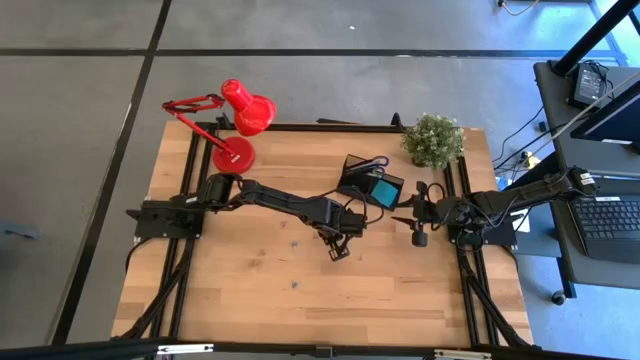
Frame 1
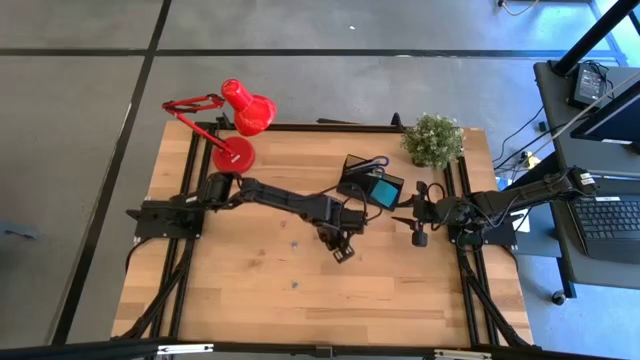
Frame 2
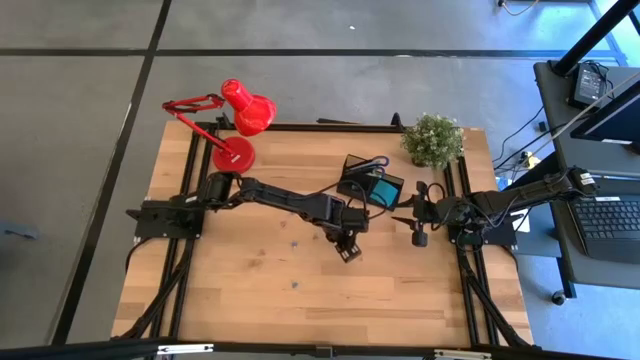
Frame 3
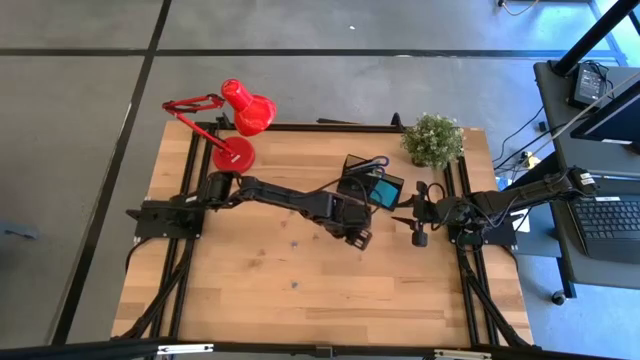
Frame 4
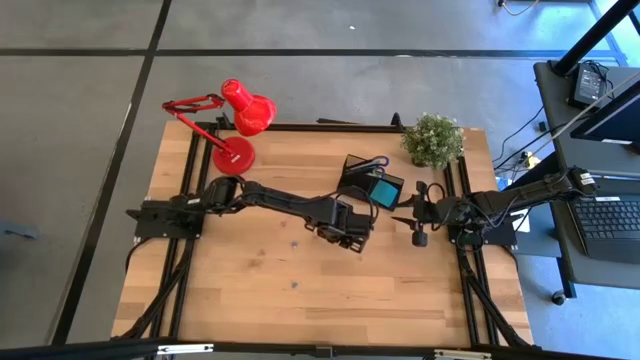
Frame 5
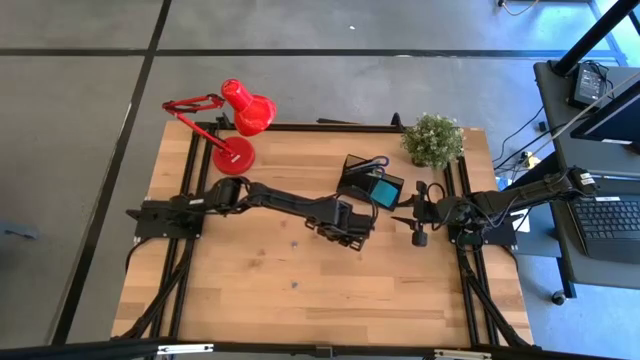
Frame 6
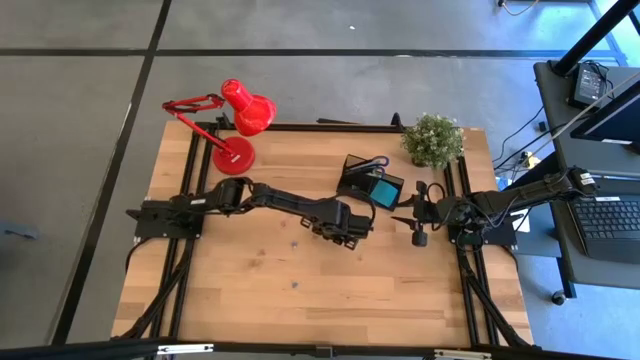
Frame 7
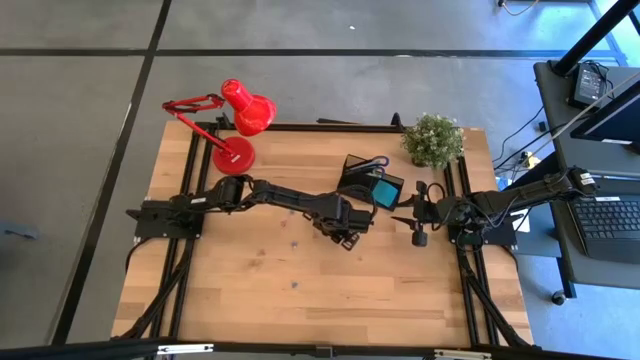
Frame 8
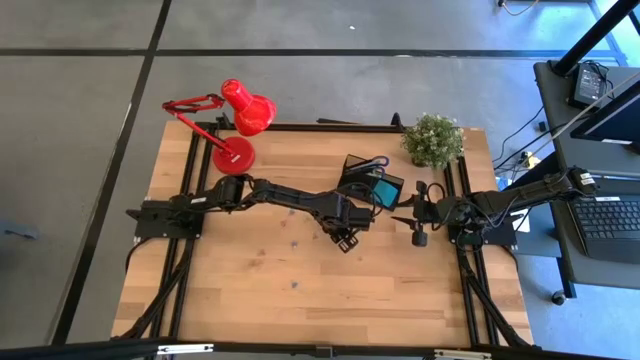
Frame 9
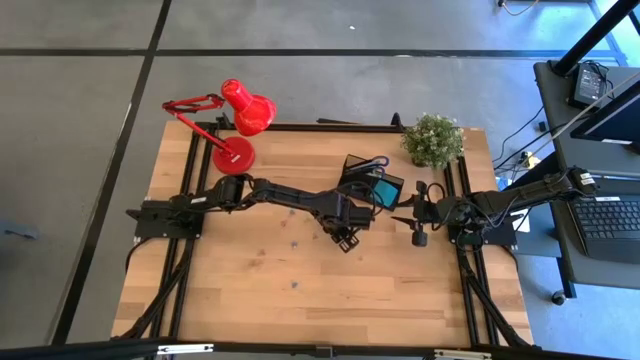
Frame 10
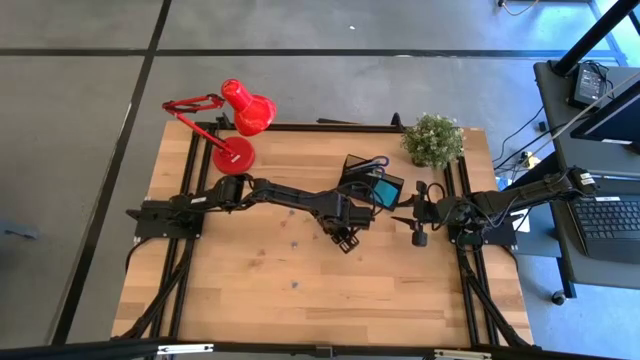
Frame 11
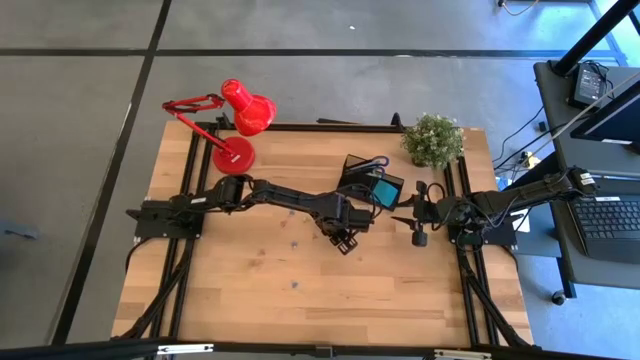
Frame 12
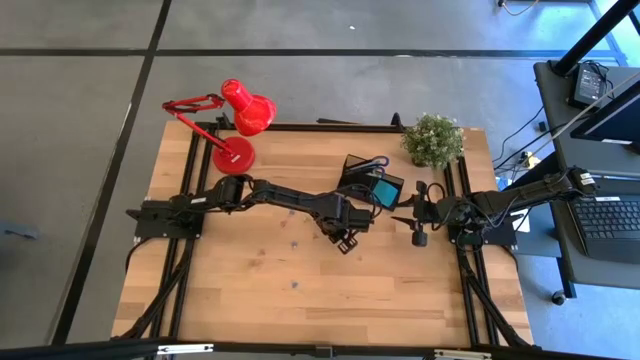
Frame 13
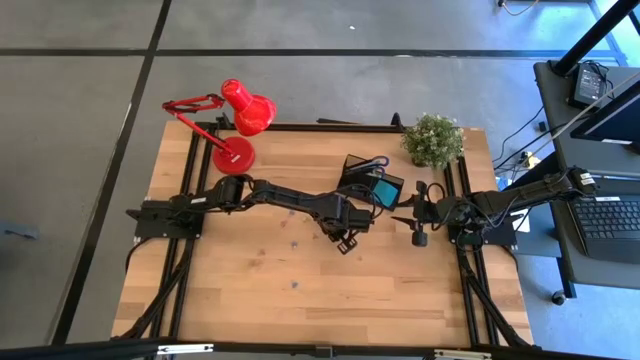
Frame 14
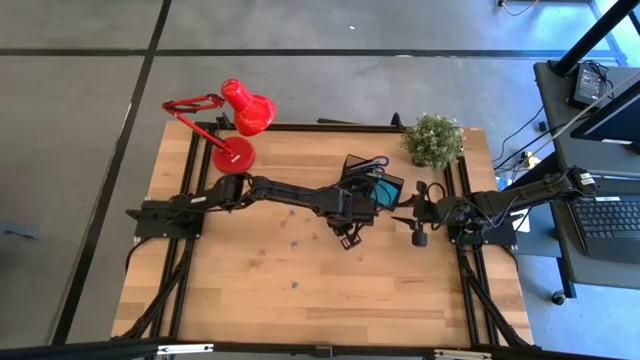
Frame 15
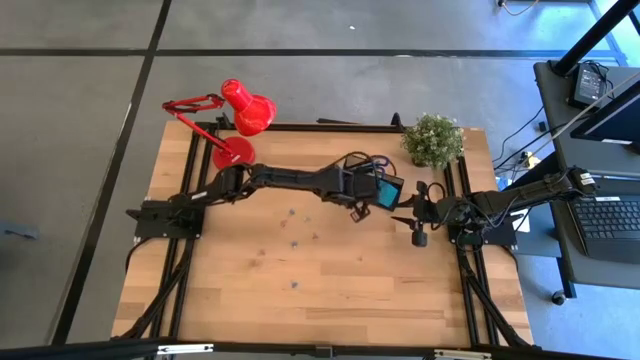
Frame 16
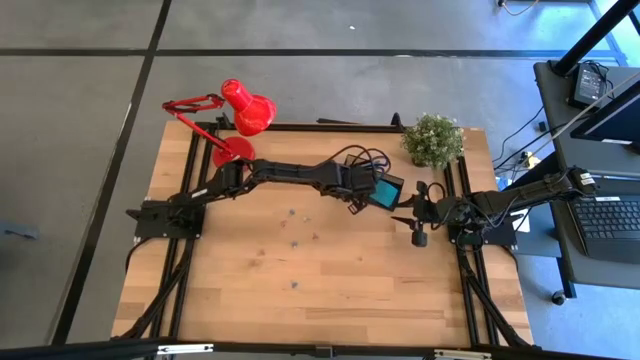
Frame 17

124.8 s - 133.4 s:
Task: Pick and place office supplies into organizer
Put the pink binder clip into the black desk organizer

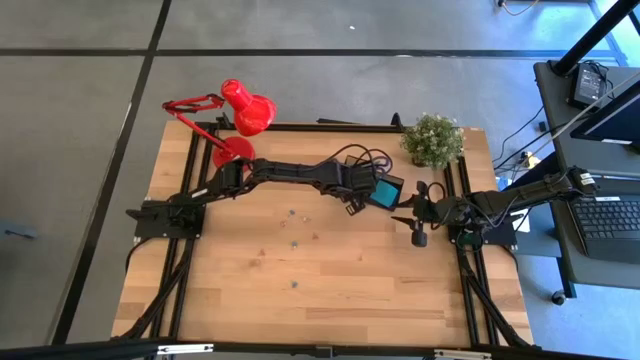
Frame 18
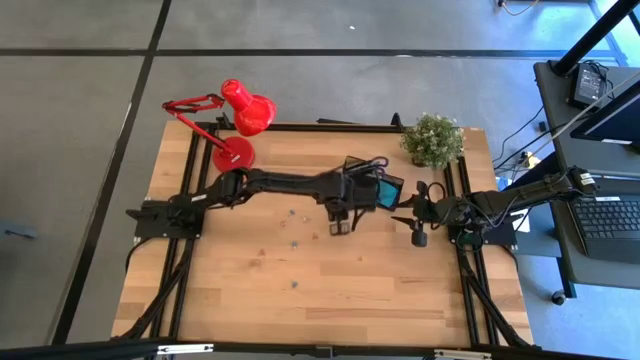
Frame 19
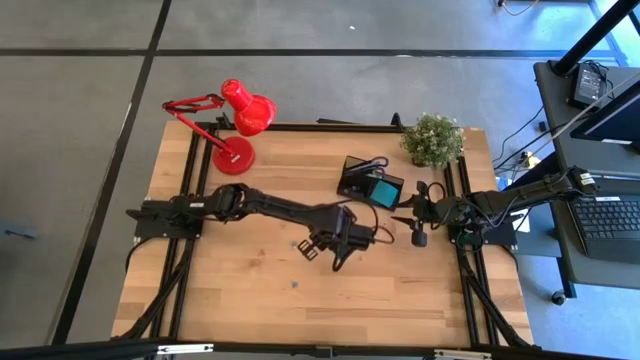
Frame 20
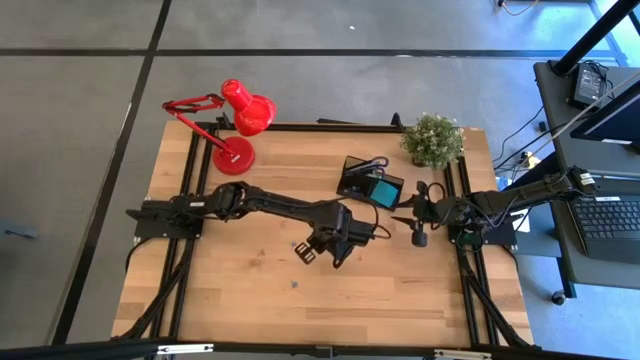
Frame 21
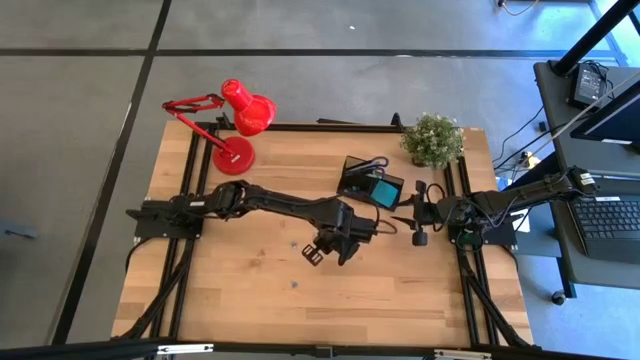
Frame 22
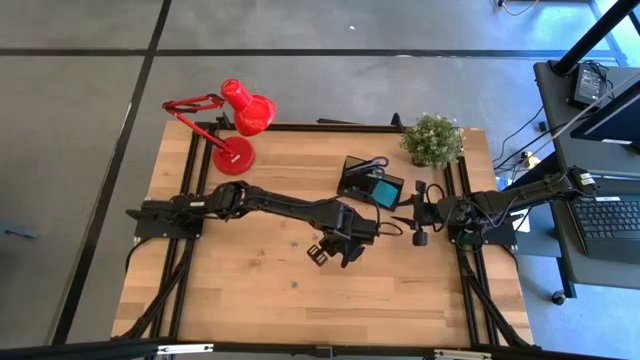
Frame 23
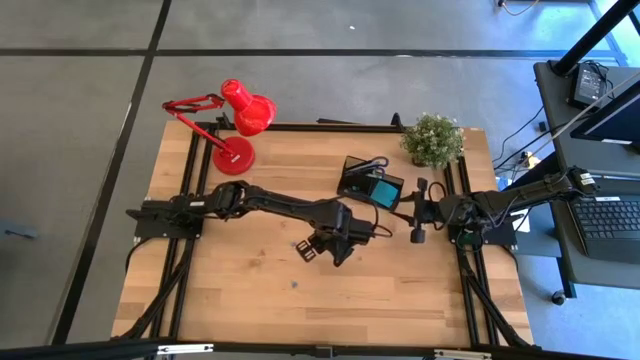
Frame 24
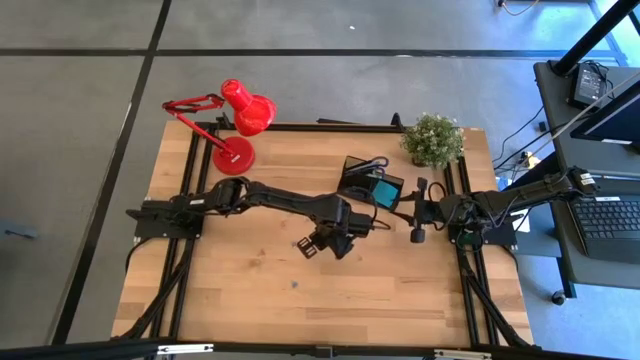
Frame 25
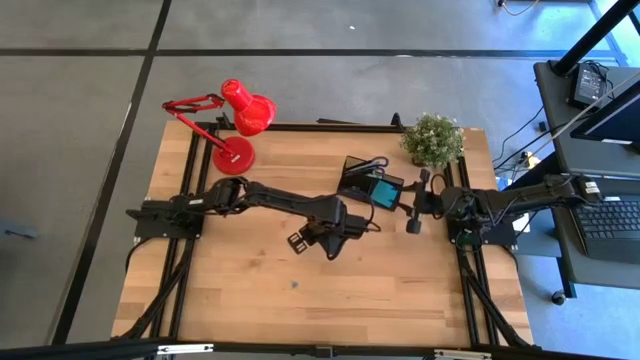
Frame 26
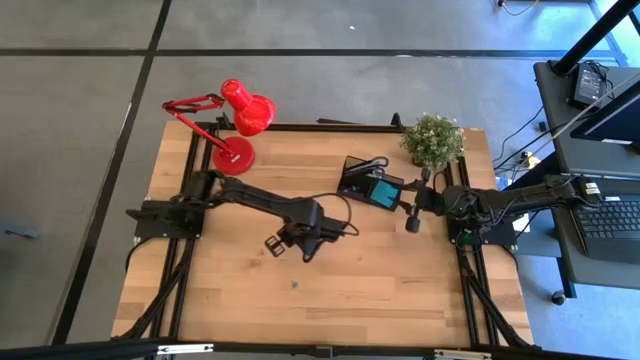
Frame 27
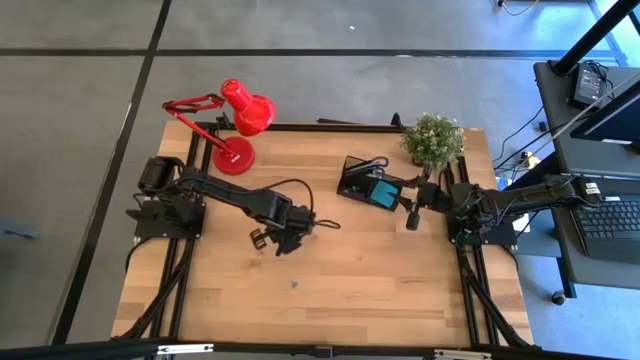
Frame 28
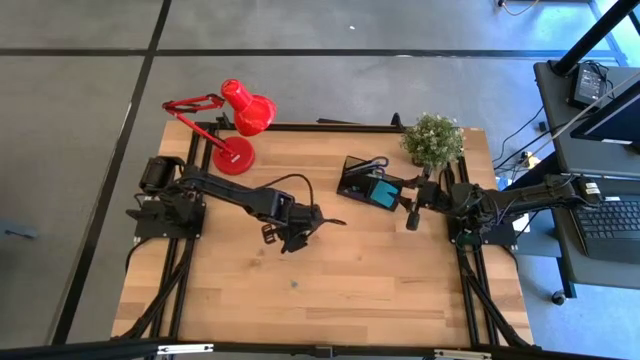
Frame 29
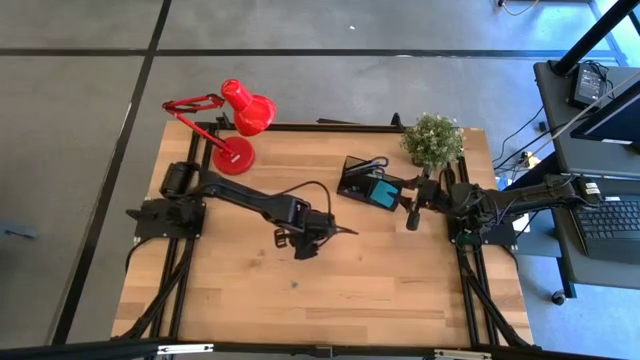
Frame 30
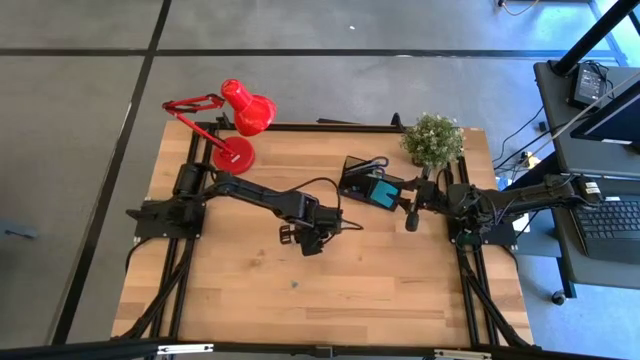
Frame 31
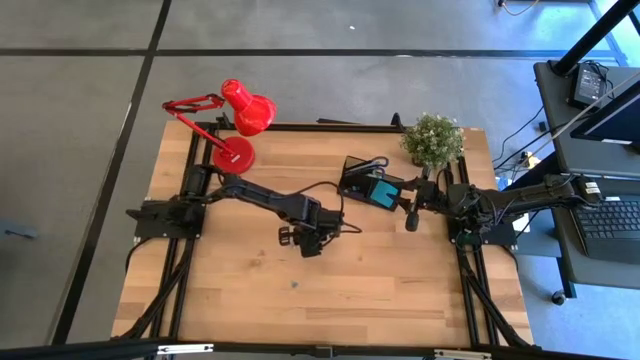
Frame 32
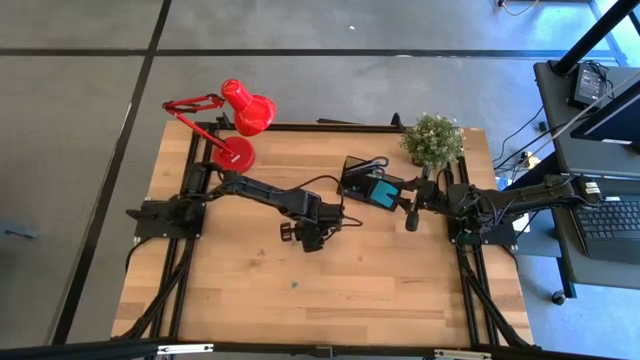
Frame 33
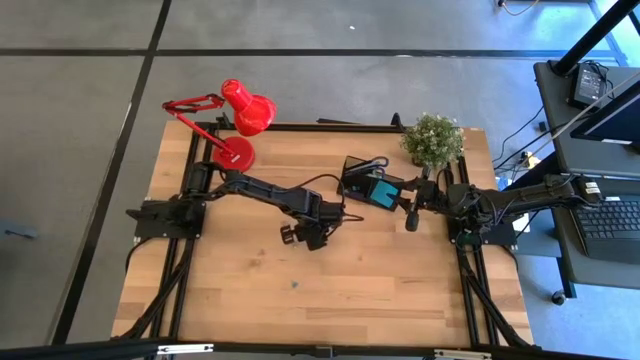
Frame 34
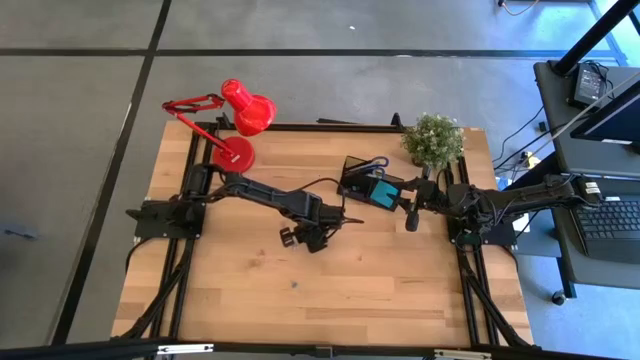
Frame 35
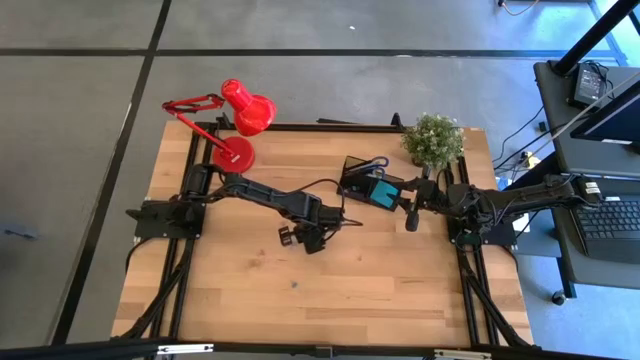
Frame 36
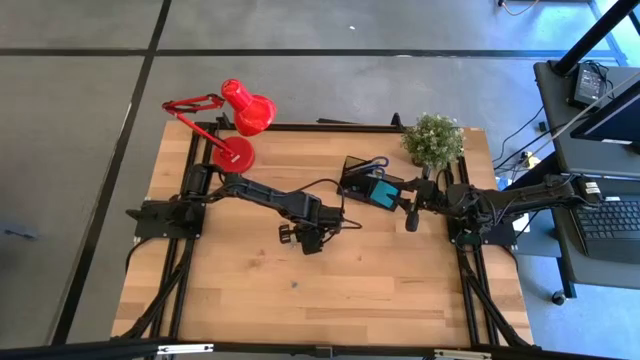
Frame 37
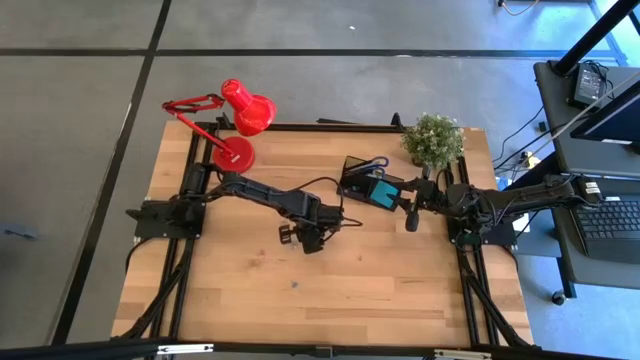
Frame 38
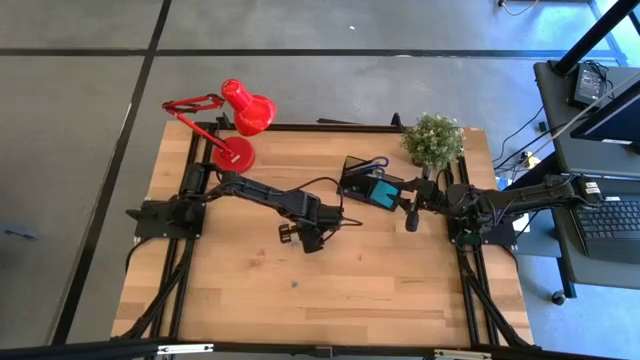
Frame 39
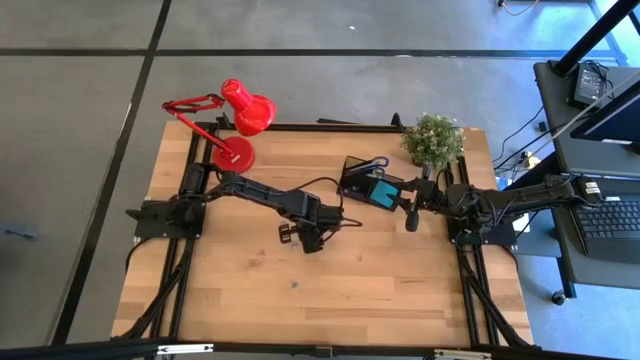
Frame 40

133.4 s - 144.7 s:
Put the pink binder clip into the black desk organizer

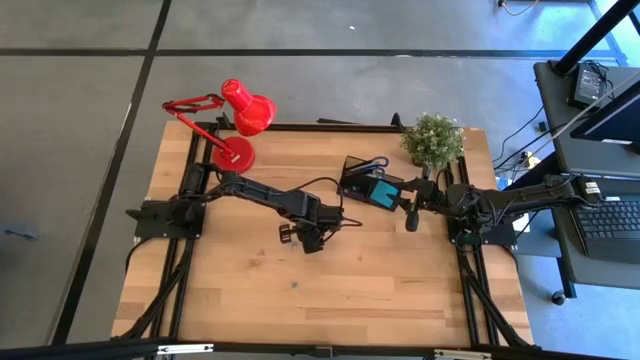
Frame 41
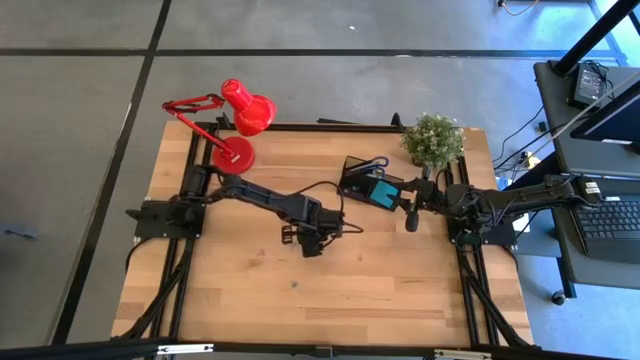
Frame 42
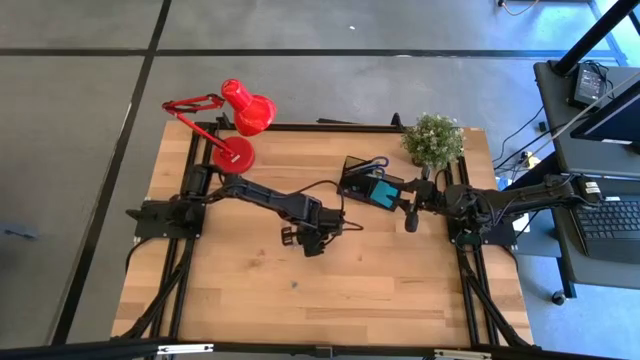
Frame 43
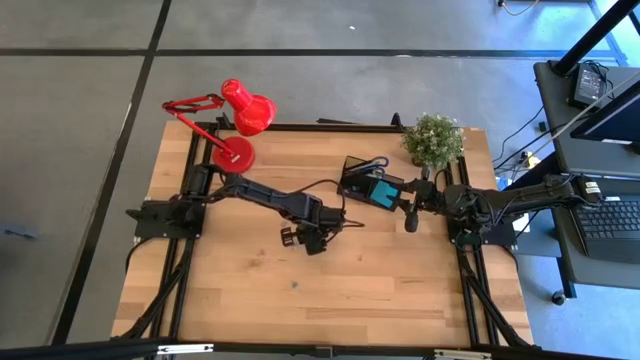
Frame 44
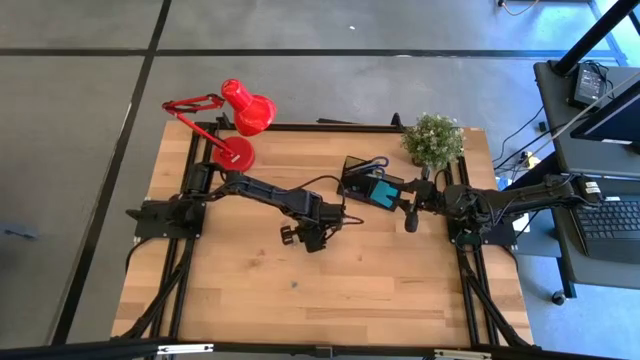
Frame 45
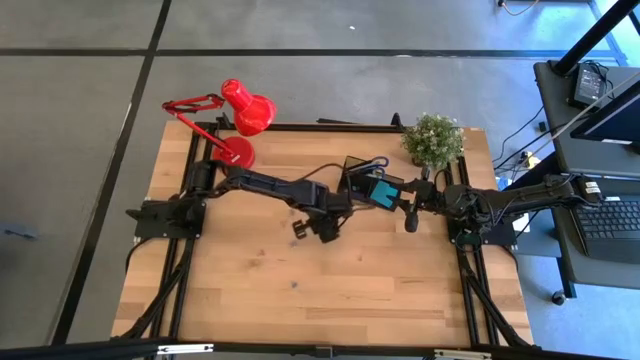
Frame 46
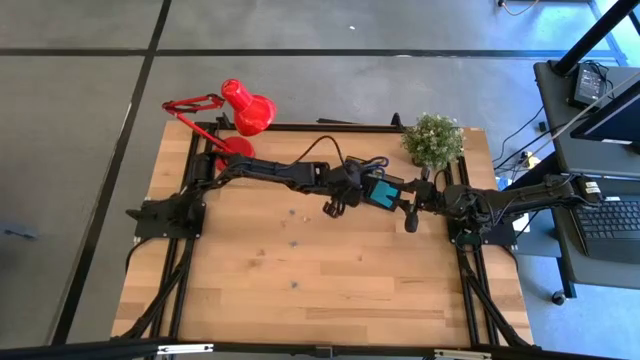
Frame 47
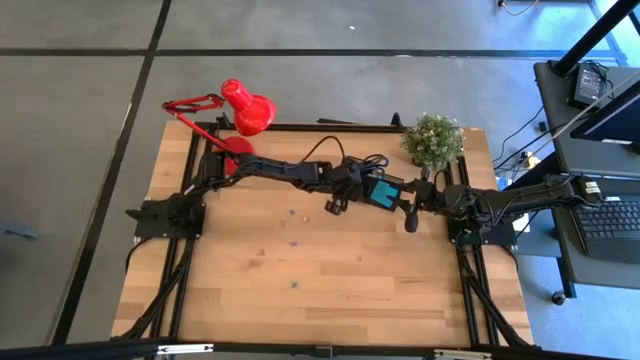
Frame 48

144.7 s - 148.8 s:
Put the pink binder clip into the black desk organizer
